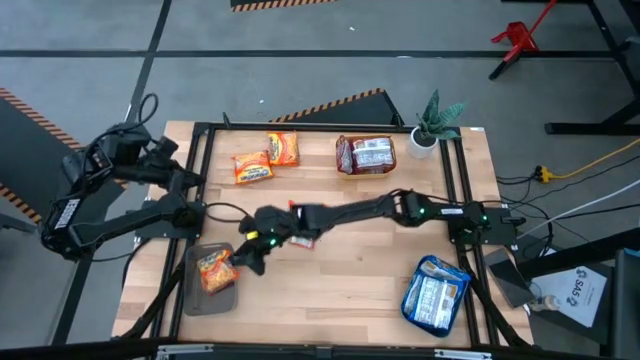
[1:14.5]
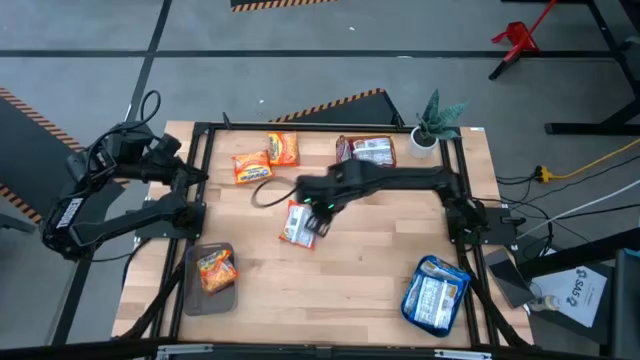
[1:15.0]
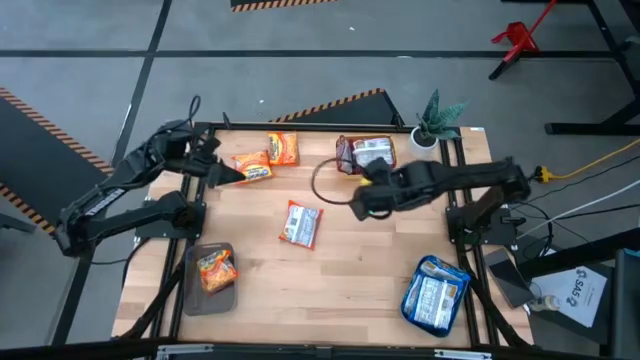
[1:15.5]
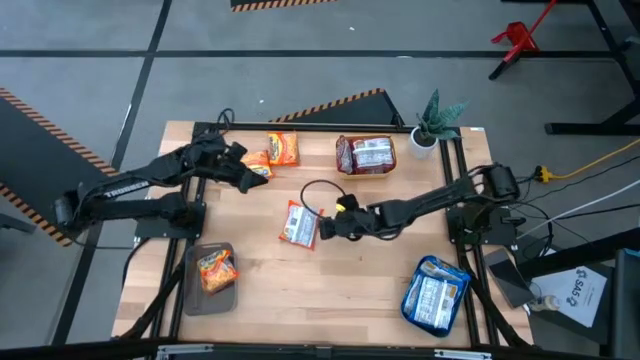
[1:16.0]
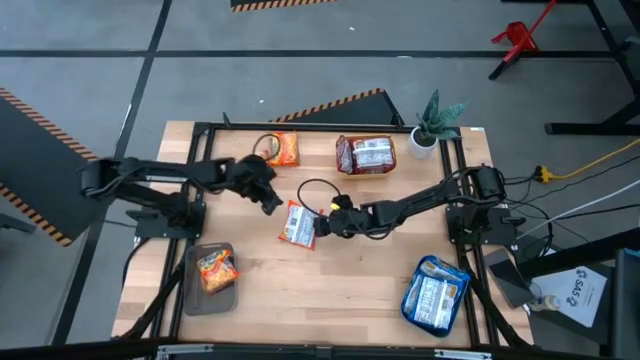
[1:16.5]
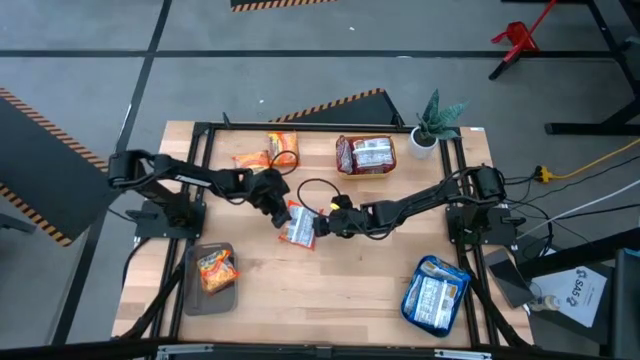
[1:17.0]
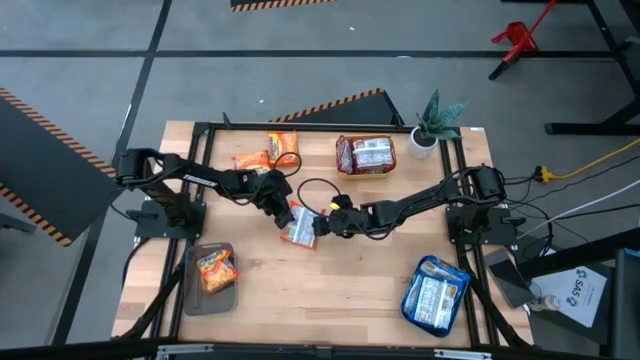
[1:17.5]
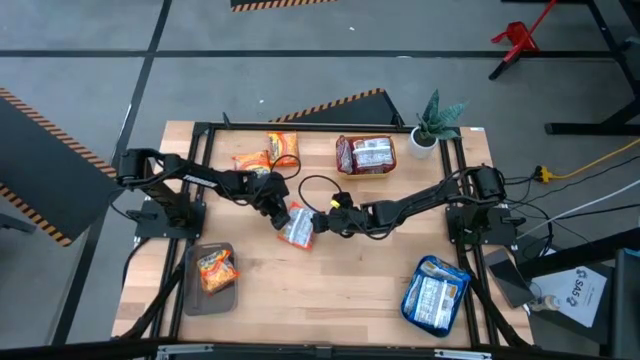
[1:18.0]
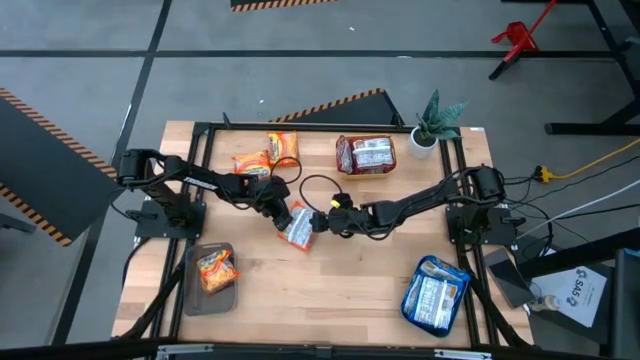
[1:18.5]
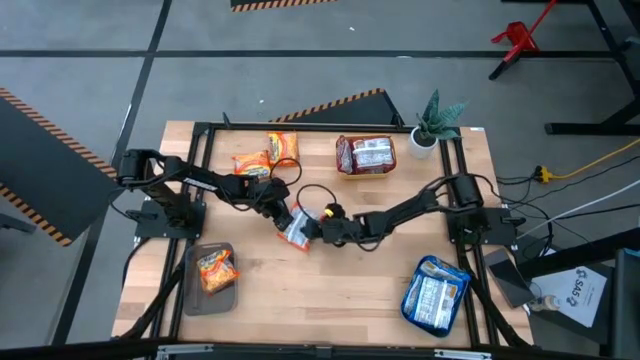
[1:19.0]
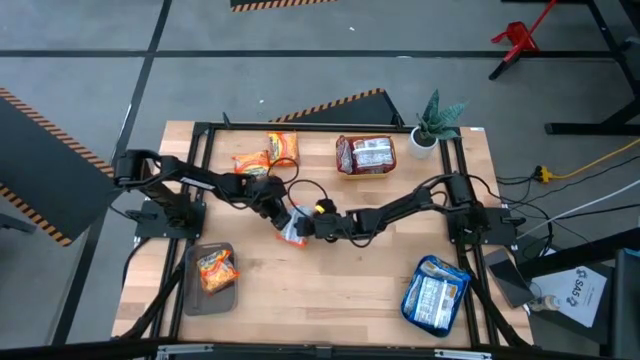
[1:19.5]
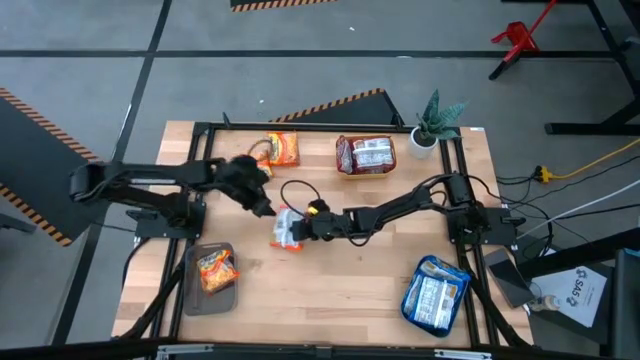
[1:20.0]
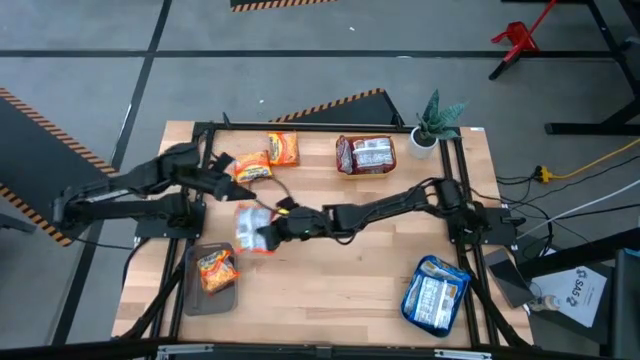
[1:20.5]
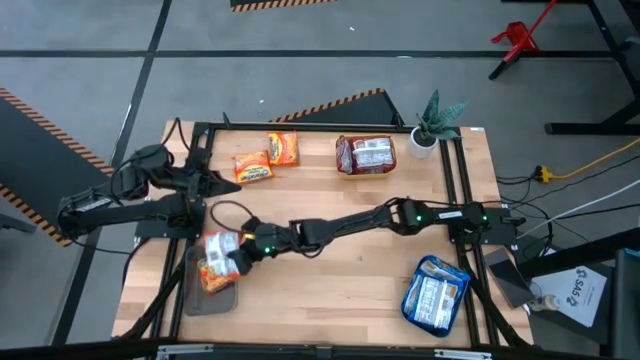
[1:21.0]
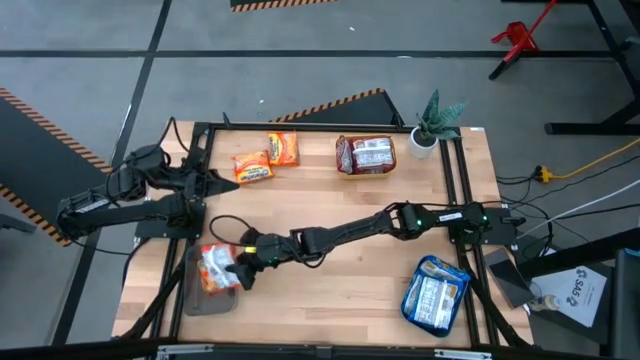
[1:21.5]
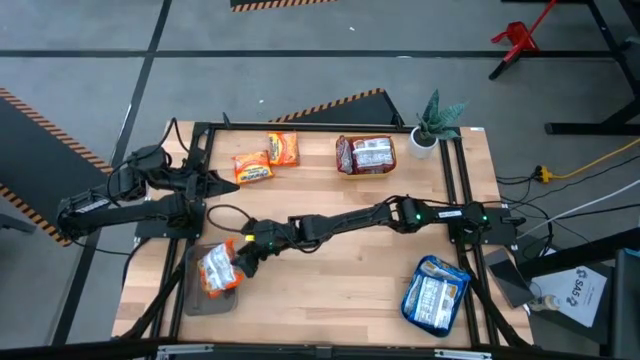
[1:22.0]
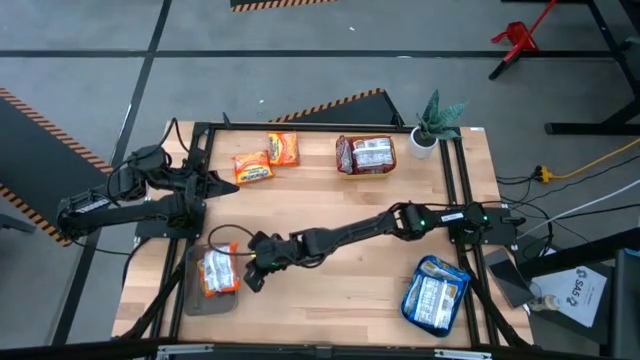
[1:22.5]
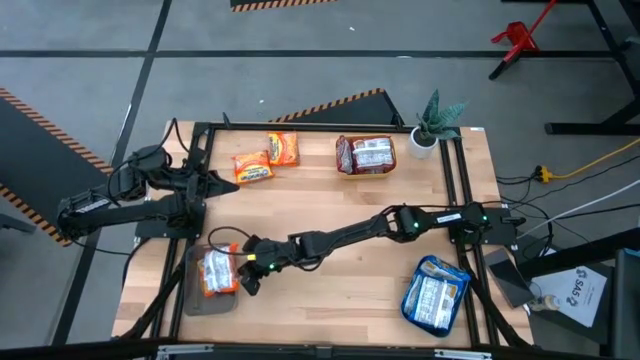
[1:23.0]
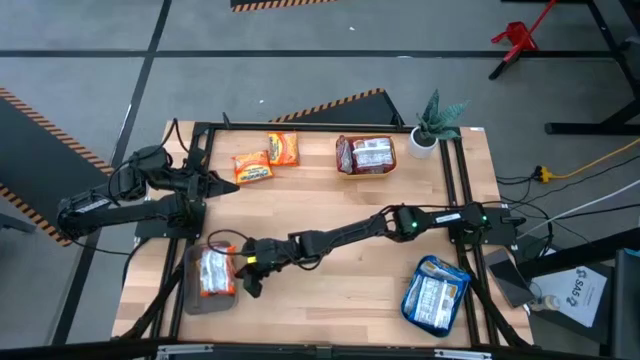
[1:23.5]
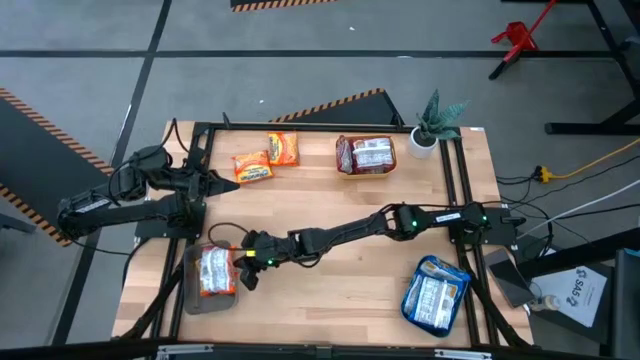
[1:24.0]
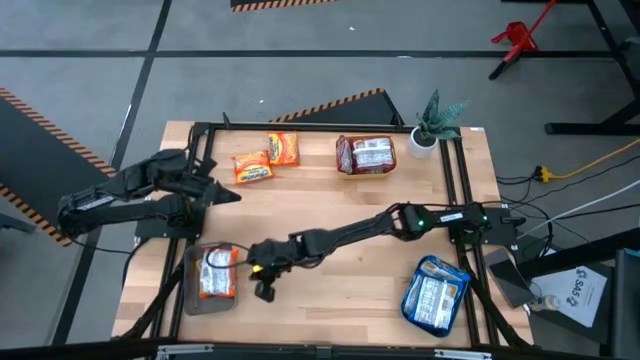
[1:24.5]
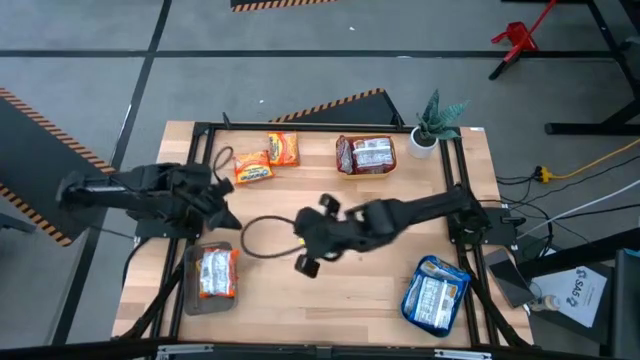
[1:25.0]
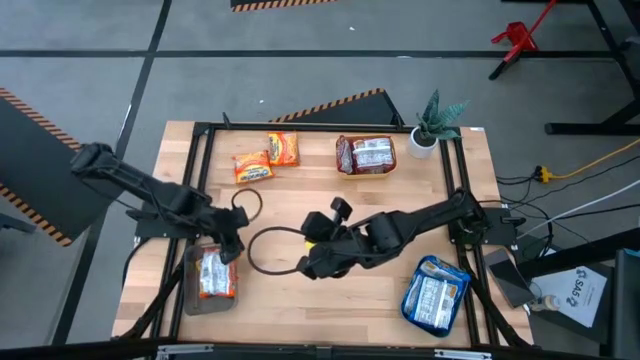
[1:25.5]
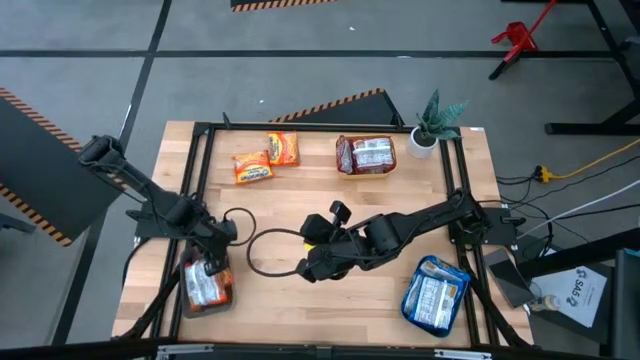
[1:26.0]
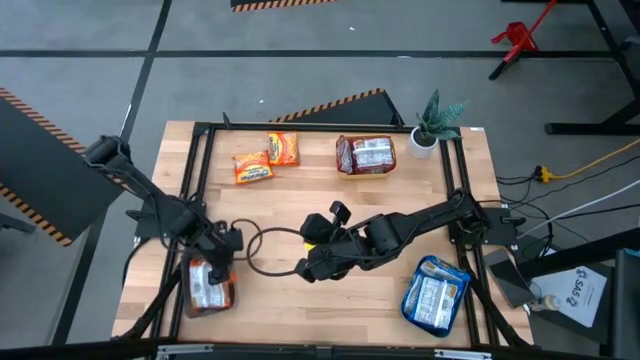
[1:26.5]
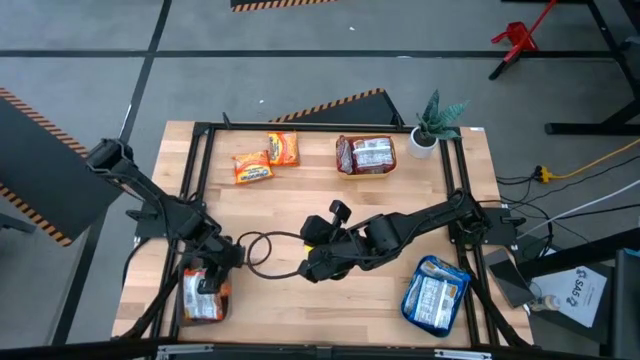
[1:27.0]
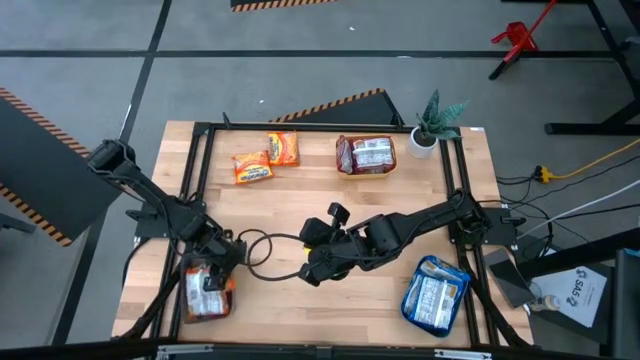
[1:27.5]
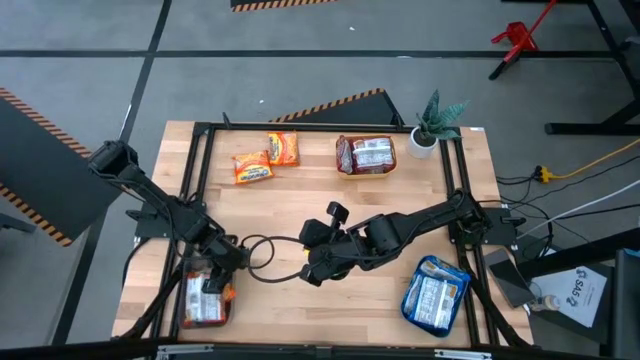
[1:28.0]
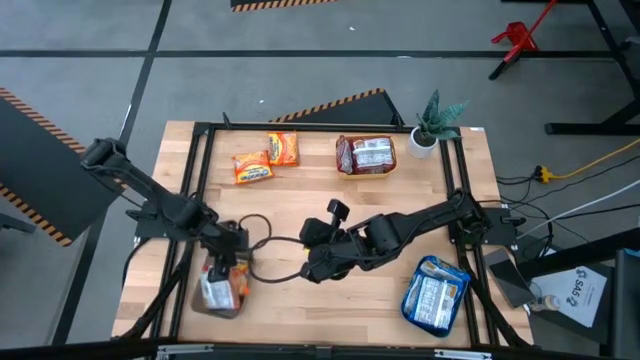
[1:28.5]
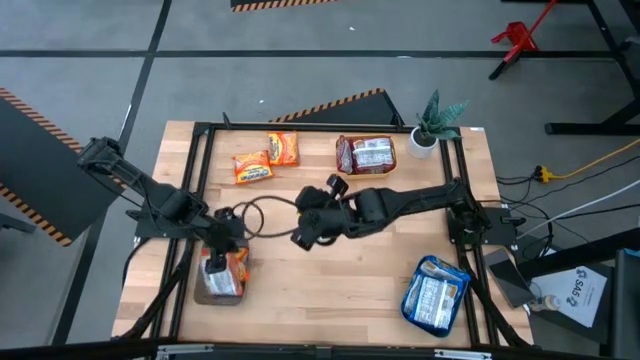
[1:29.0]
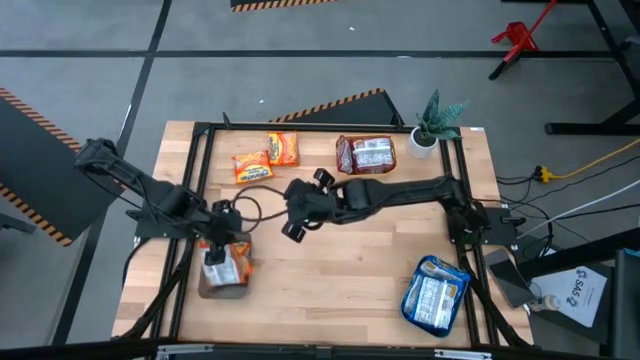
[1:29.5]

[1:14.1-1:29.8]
Task: Sort Maruchan noodles
Put the orange noodle pack into the black bin

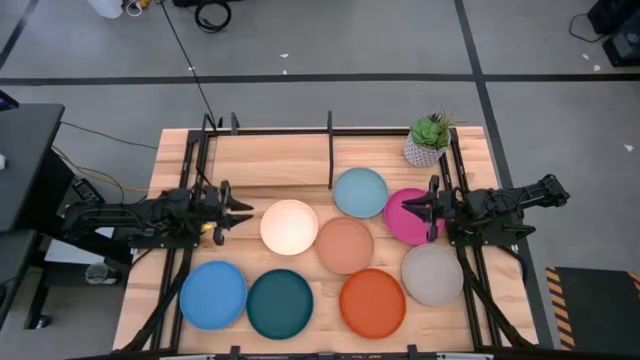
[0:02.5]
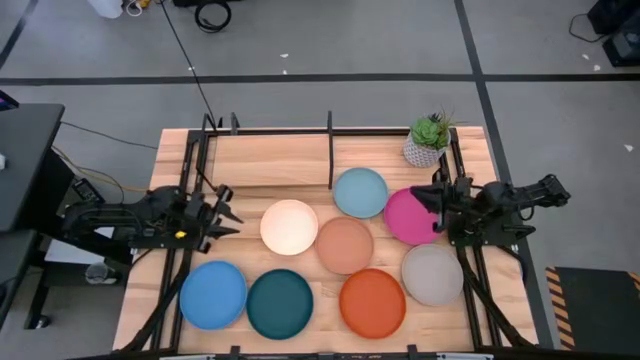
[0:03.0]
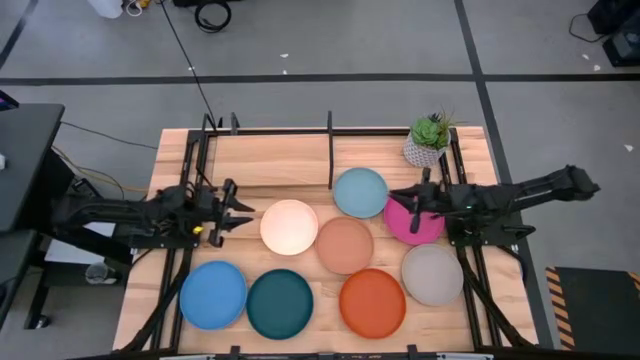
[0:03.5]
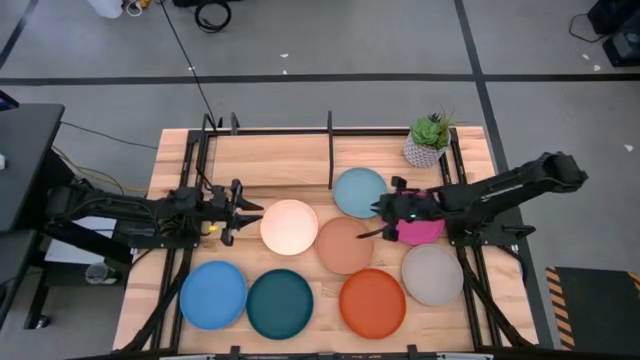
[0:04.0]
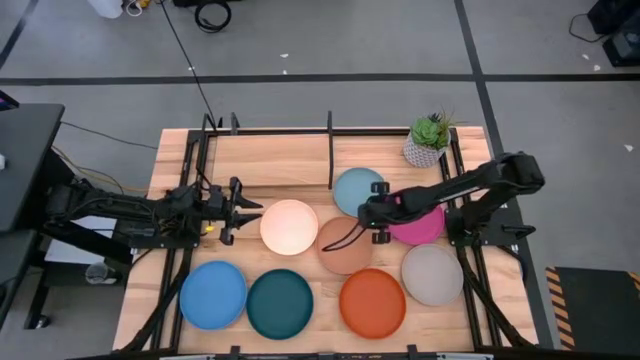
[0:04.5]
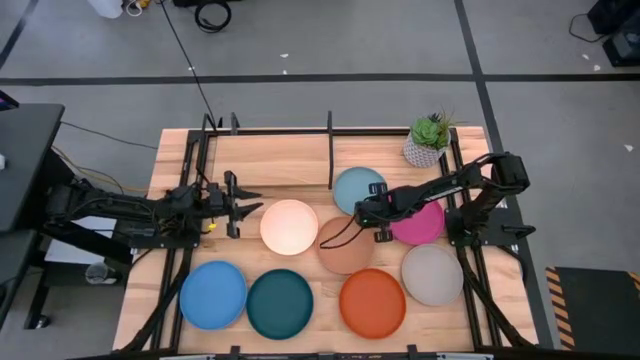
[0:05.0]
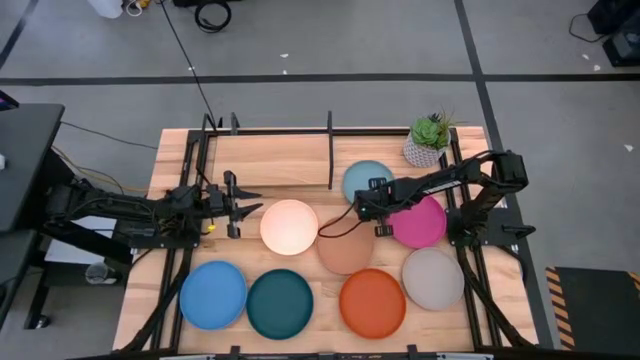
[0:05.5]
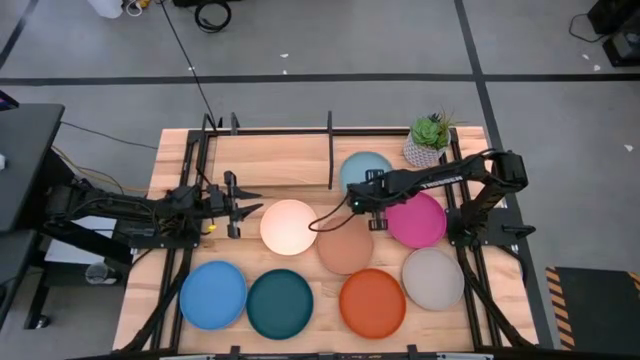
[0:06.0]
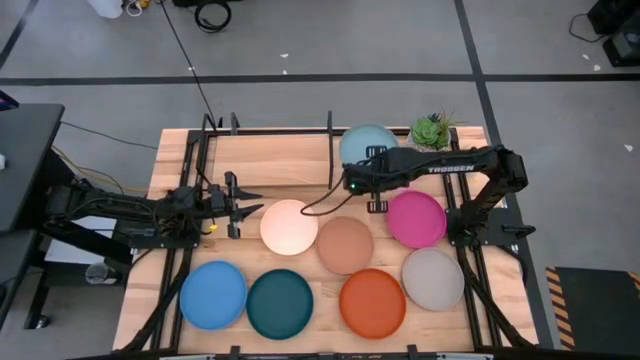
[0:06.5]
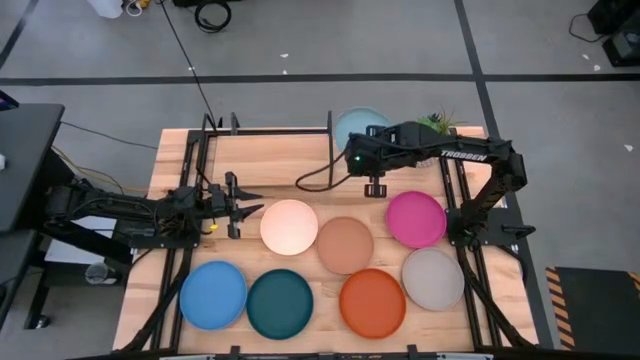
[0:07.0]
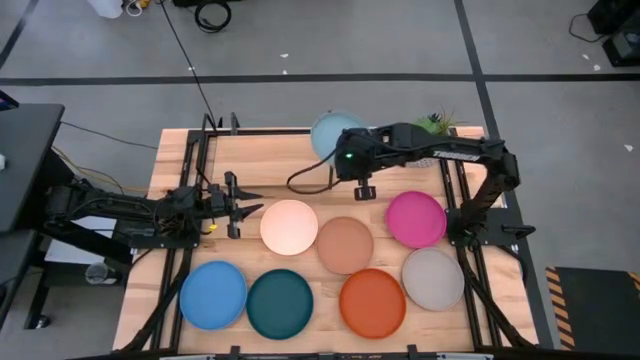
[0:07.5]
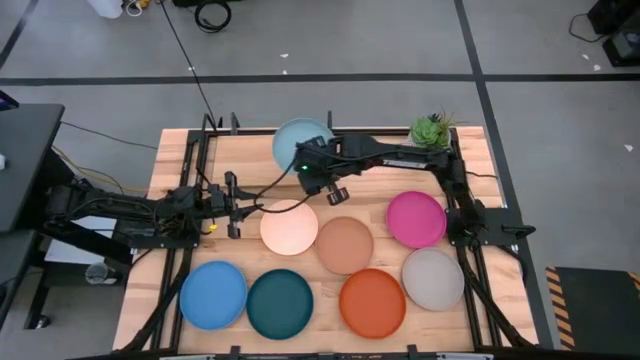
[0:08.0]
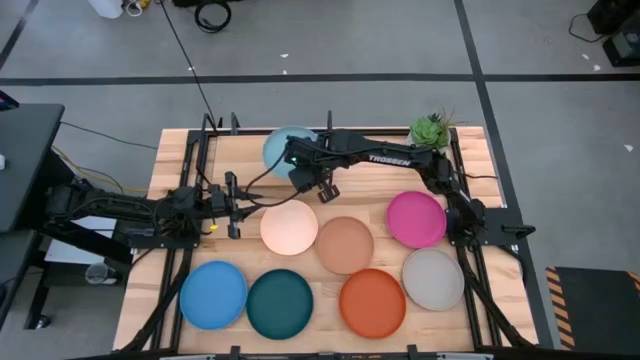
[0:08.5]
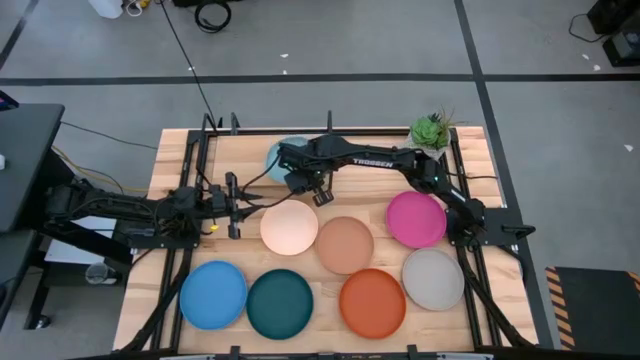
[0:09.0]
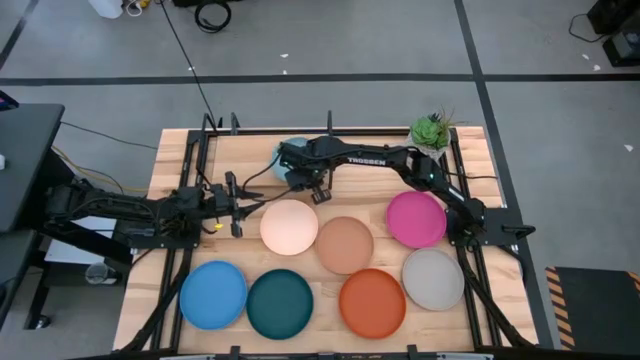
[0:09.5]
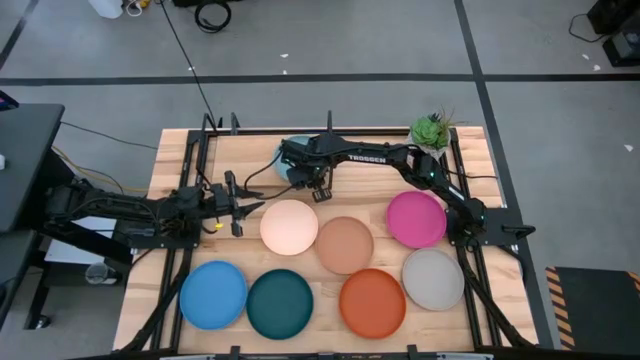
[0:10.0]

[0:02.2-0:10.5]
Task: Place and stack plates onto a shelf
Put the light blue plate on the shelf
